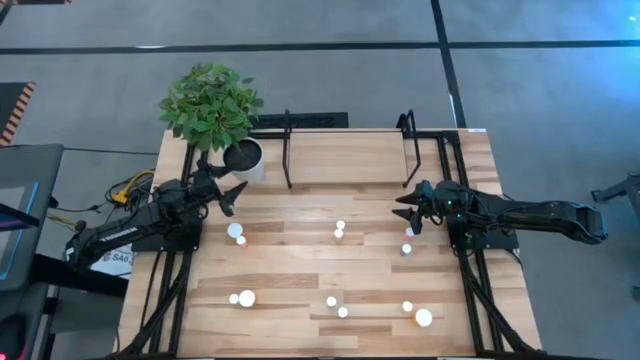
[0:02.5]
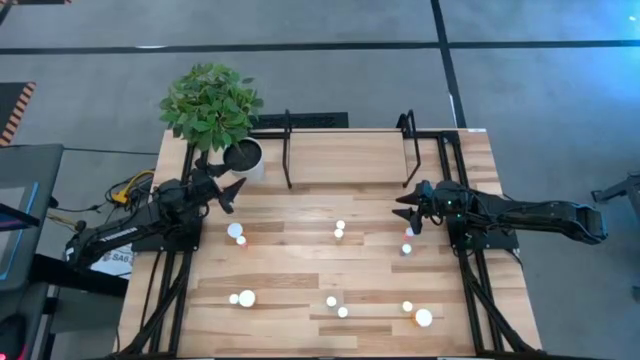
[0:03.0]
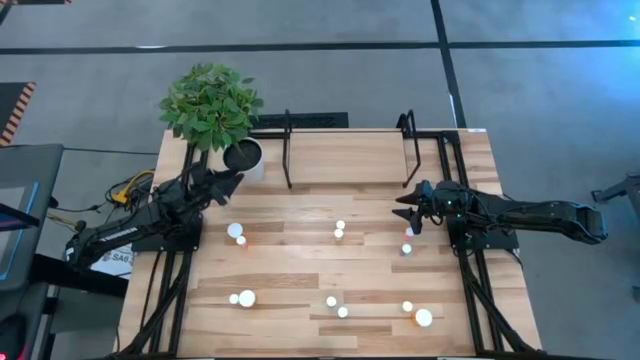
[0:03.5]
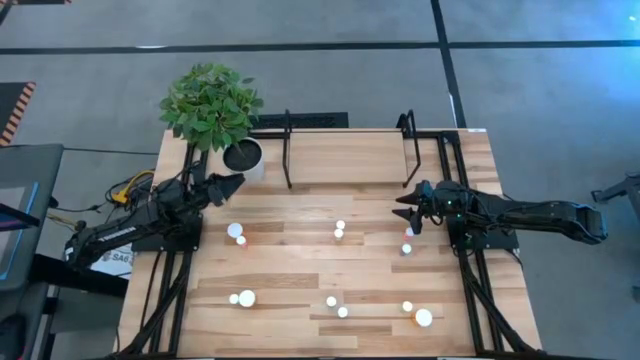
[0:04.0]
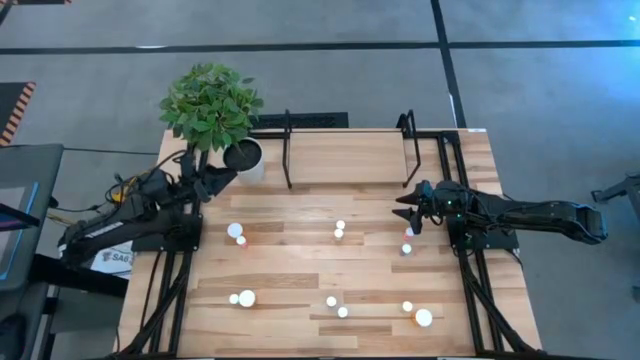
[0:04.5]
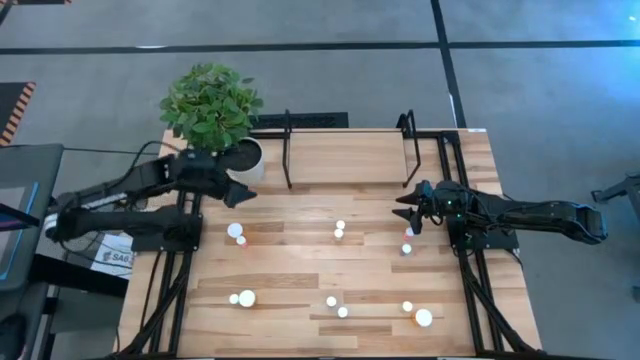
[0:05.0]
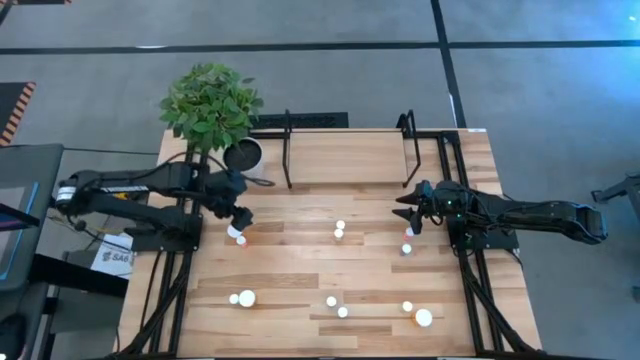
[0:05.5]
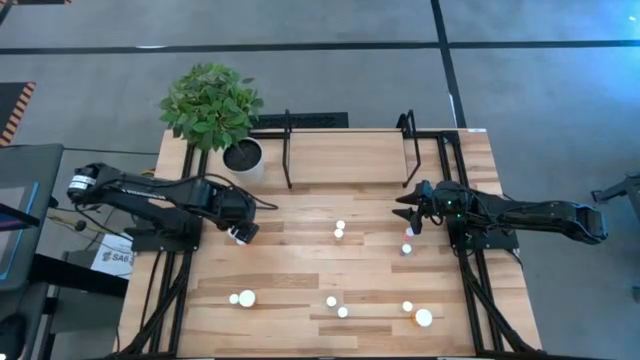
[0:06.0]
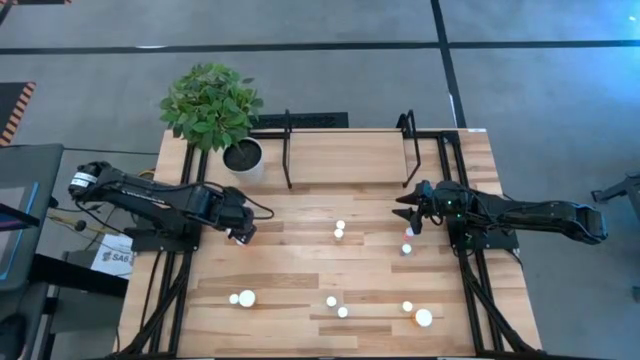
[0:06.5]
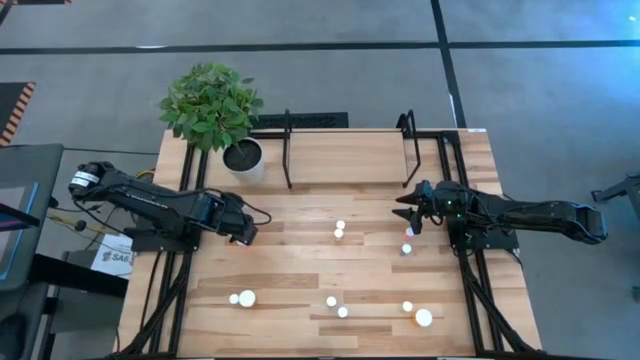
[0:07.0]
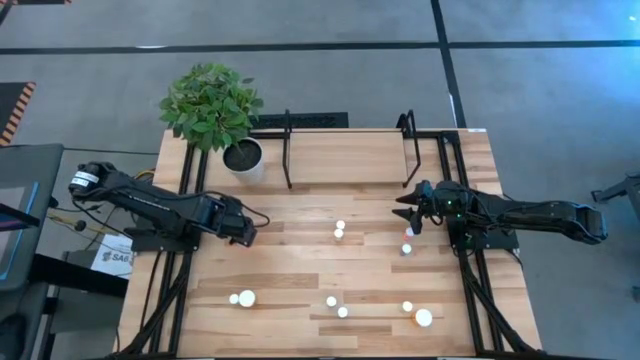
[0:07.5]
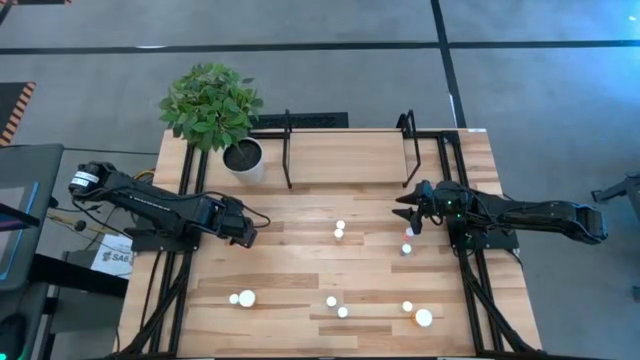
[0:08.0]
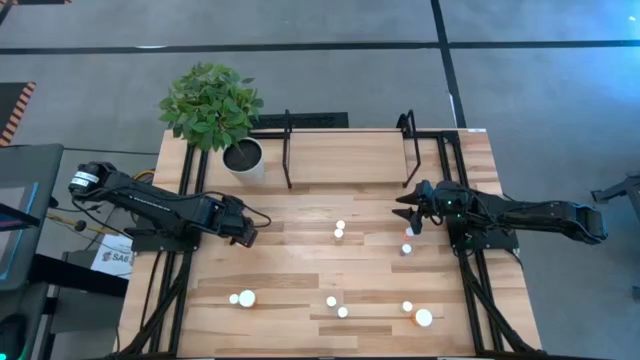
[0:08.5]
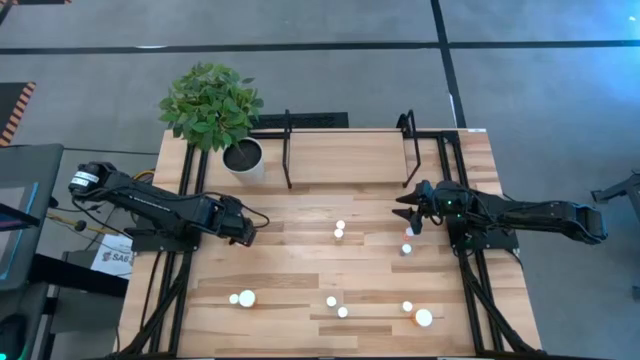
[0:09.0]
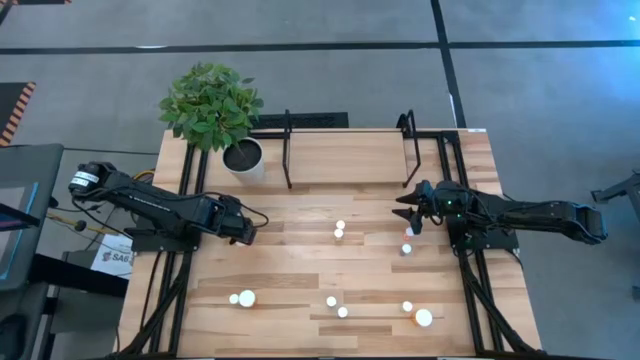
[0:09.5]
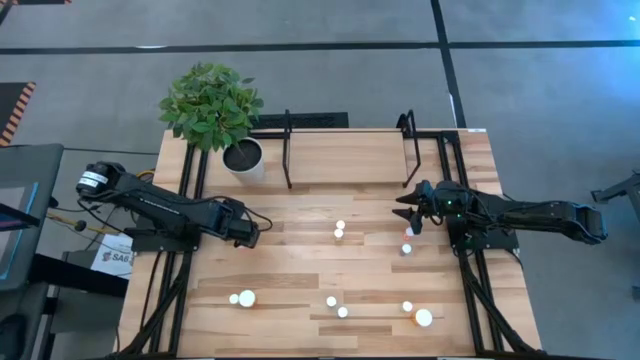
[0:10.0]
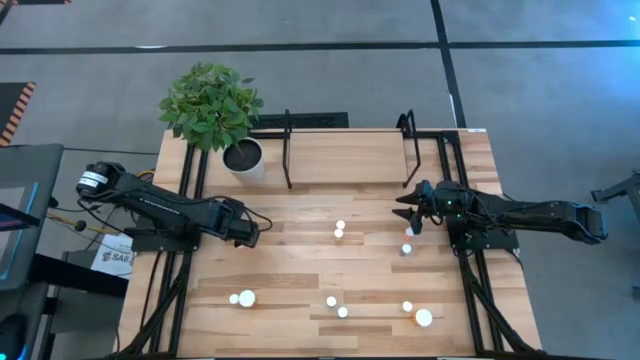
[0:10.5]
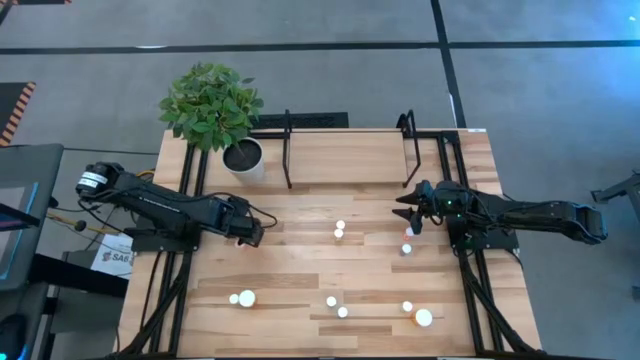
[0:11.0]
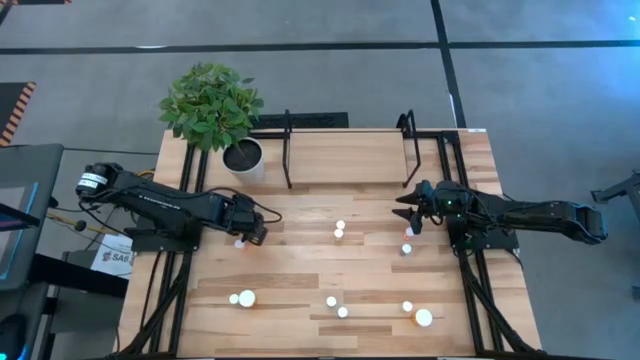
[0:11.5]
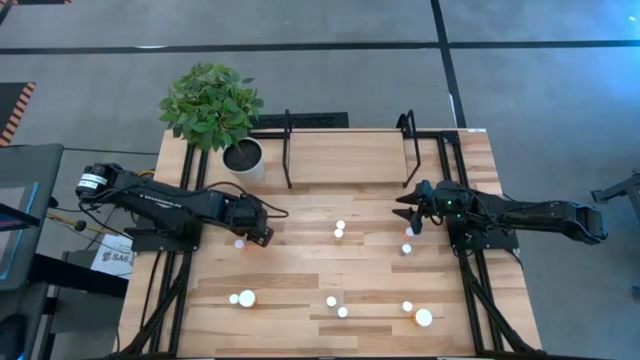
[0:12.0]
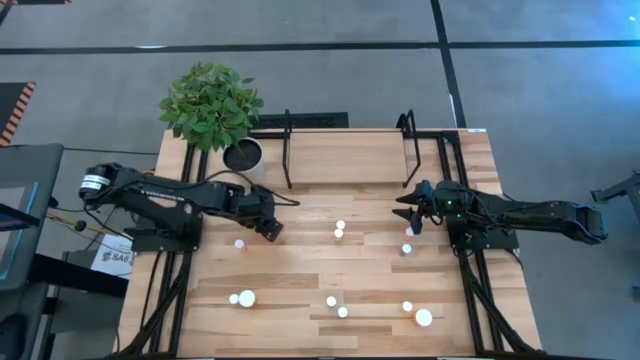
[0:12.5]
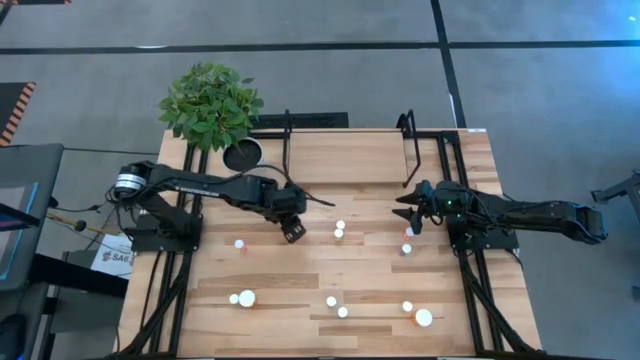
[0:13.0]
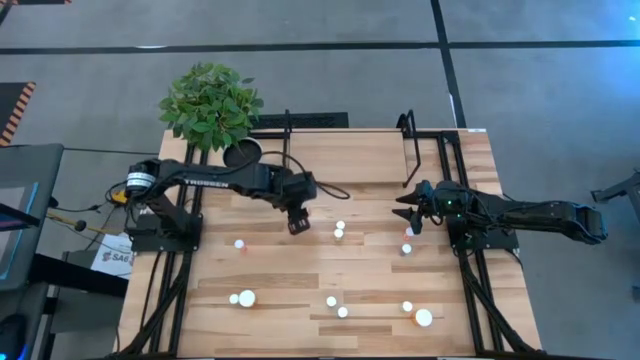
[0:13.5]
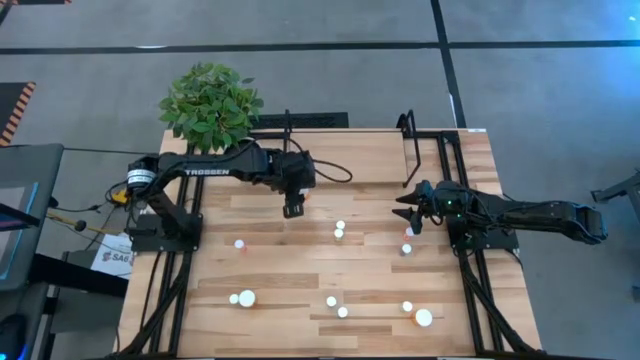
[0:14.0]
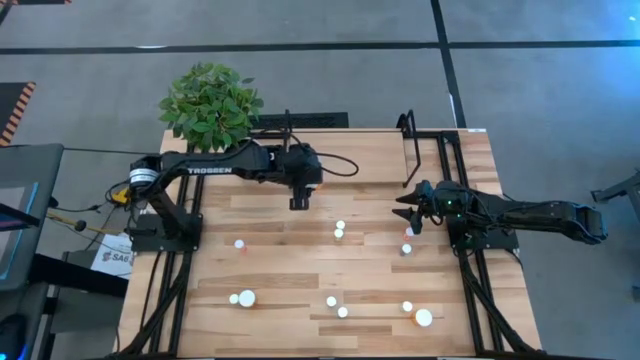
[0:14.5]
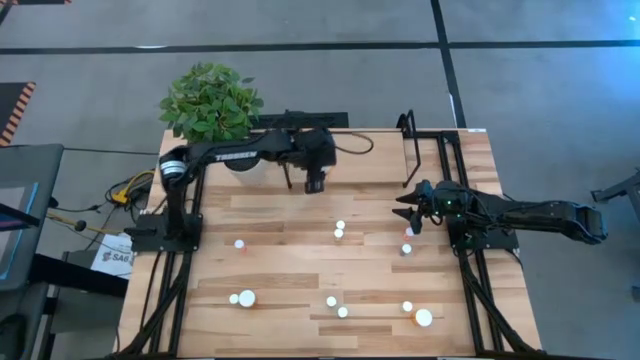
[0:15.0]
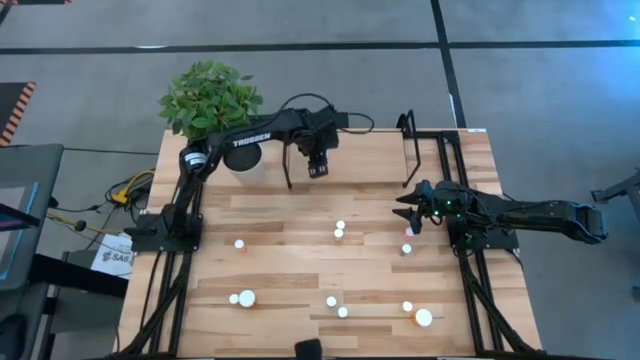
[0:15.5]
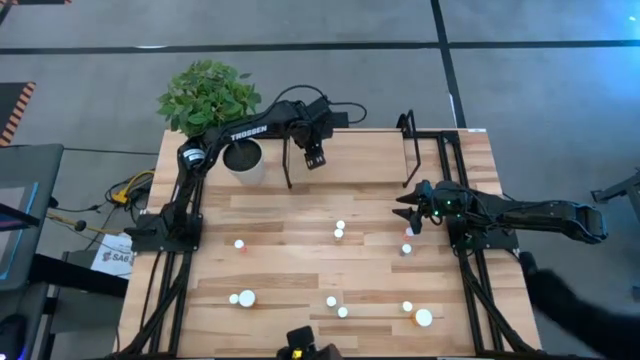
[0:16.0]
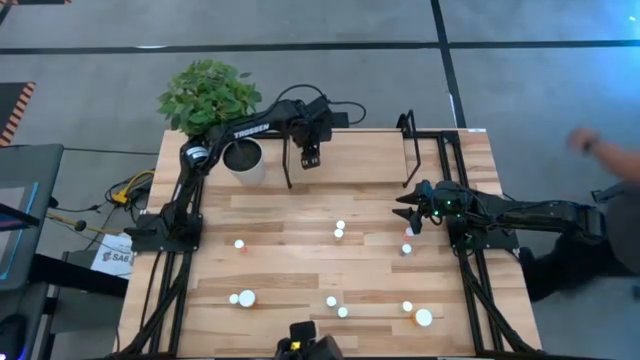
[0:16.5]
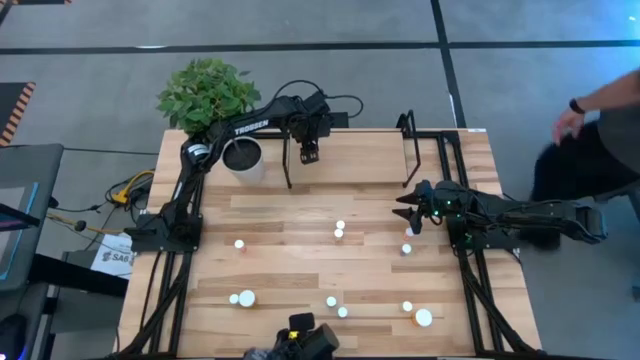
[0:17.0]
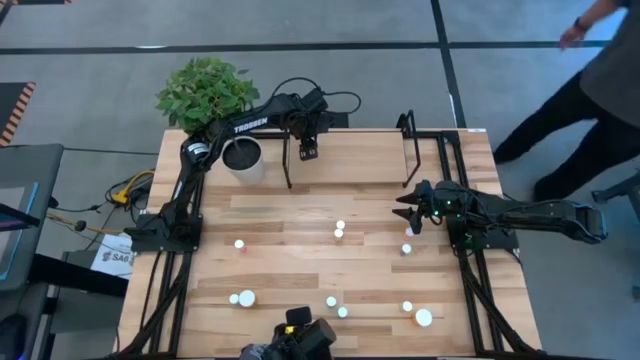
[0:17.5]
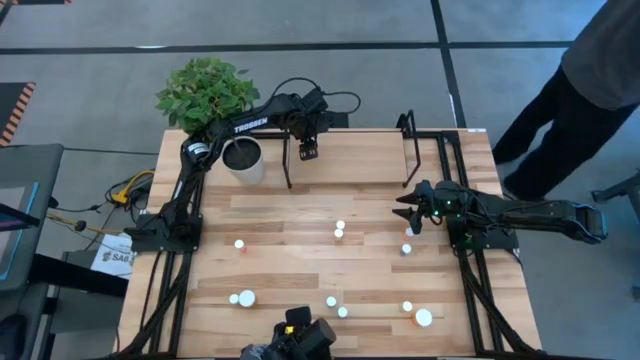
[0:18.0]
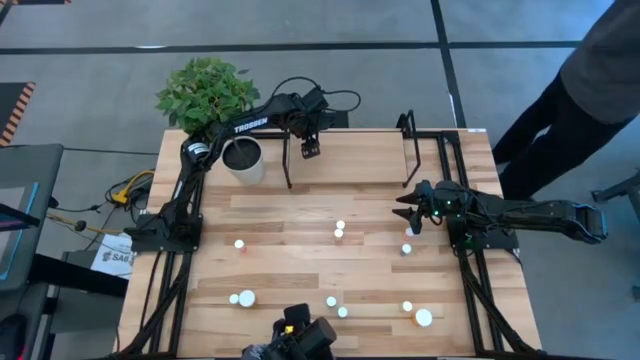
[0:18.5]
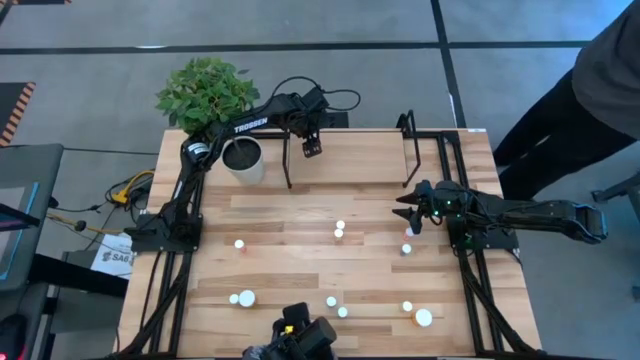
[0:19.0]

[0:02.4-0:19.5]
Task: Pick and place medicine bottles onto shelf by color
Put the top orange pill bottle on the shelf

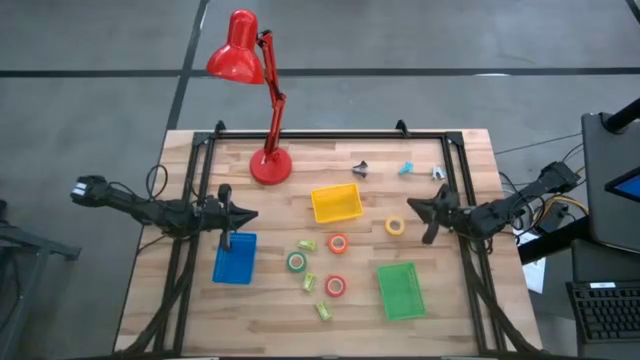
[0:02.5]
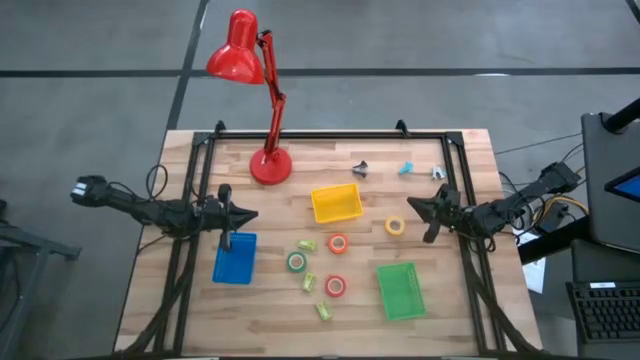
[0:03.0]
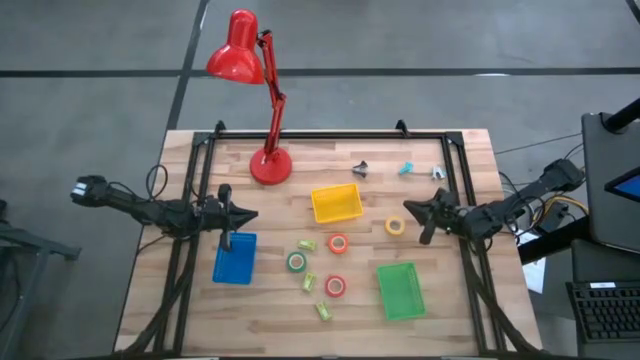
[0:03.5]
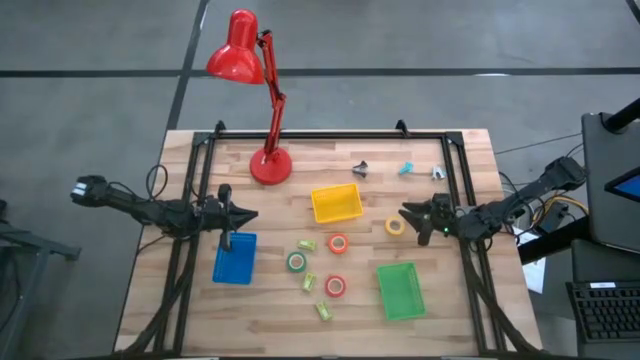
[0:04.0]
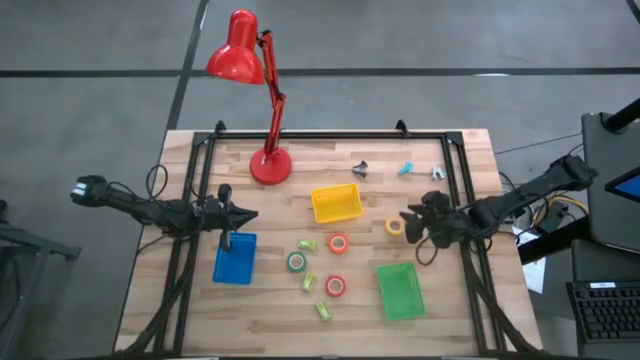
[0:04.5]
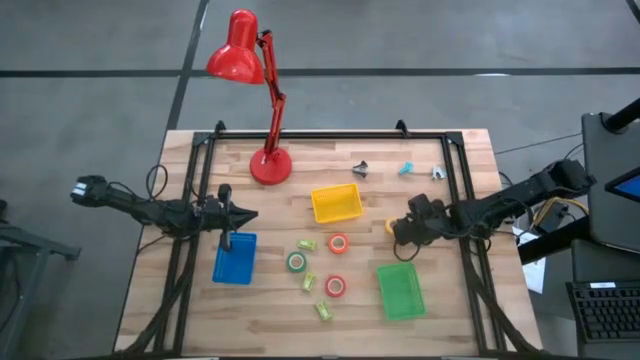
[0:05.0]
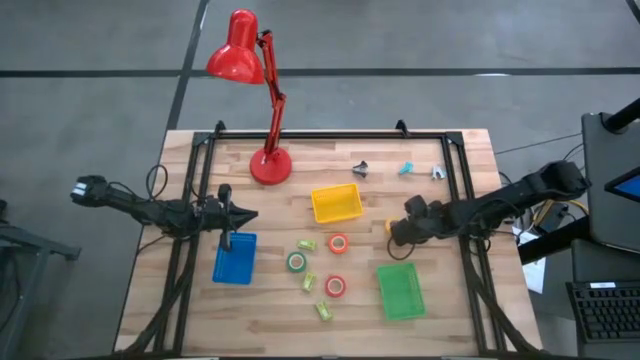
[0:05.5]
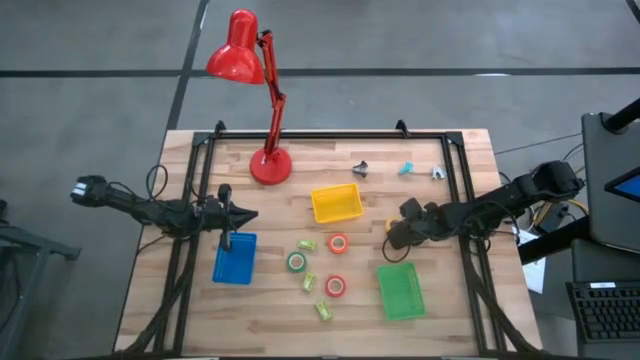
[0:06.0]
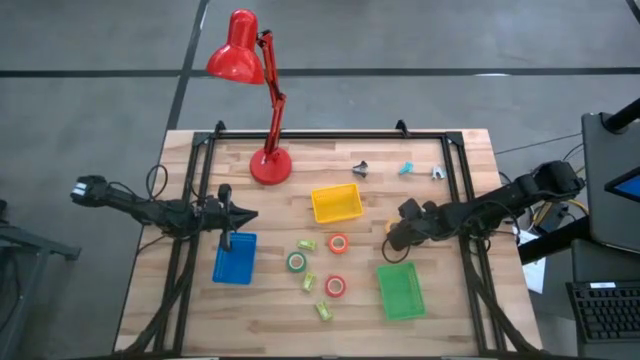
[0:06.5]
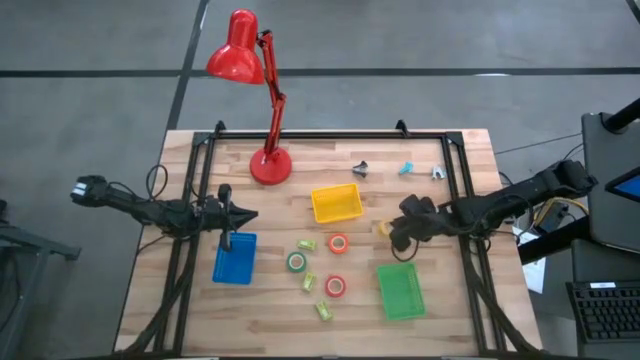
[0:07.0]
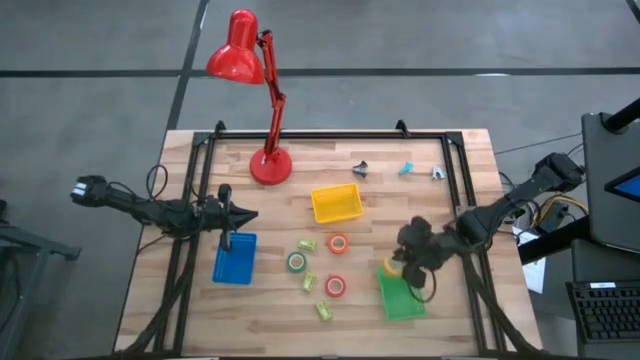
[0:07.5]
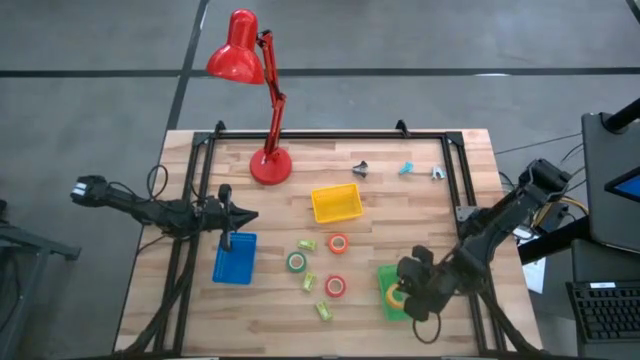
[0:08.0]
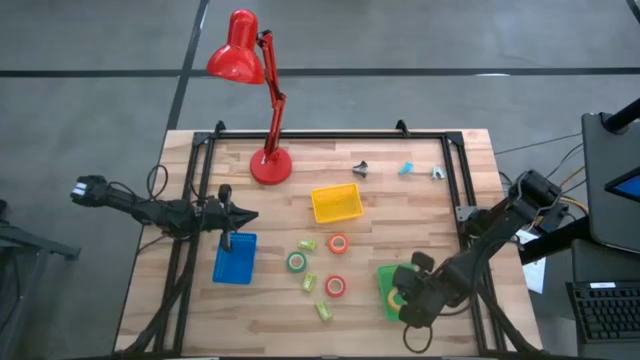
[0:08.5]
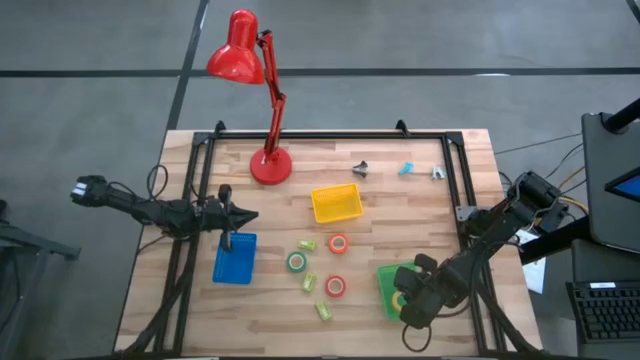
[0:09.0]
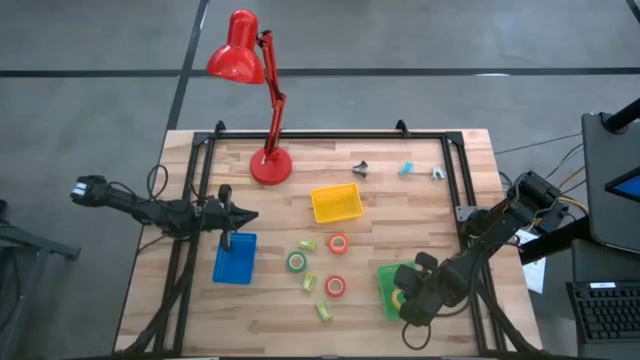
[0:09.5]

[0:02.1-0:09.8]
Task: Pick and place Stapler, Stapler remover, tape
Put the yellow tape into the green bin
